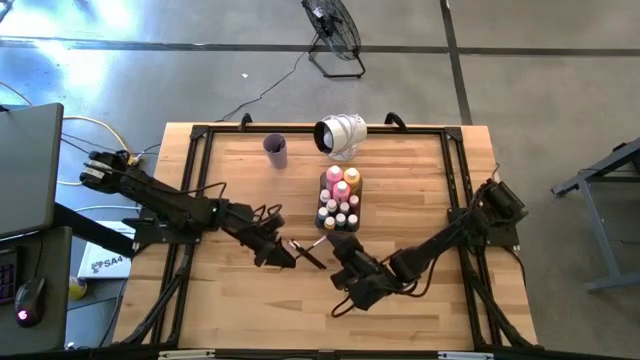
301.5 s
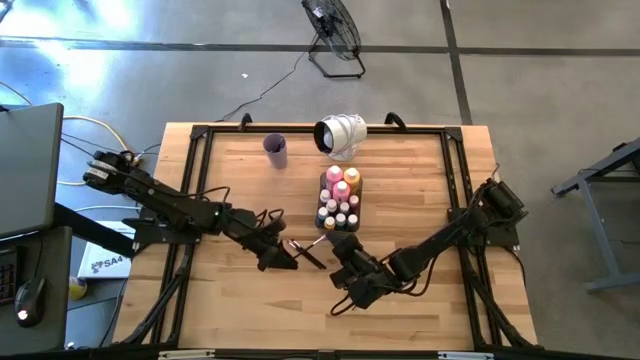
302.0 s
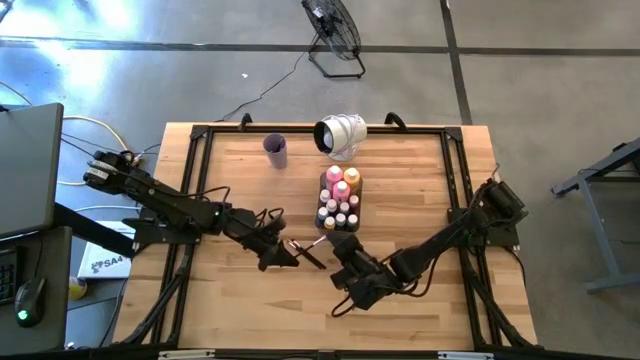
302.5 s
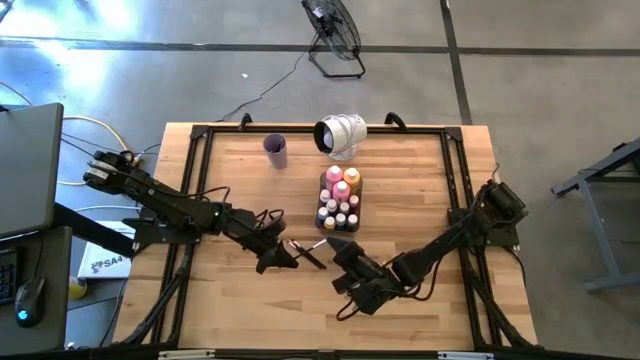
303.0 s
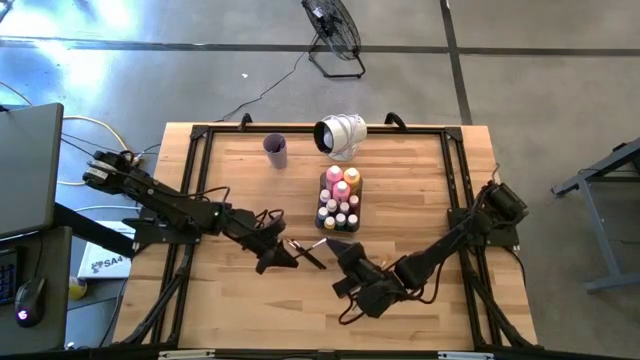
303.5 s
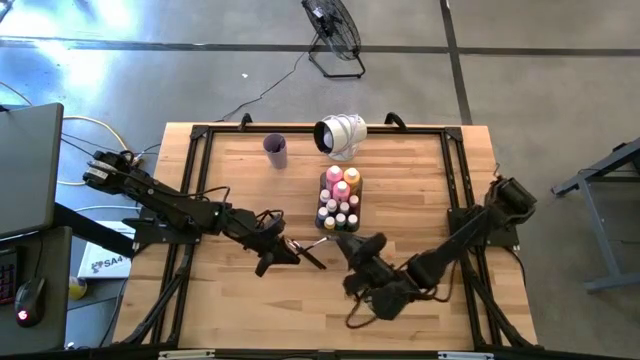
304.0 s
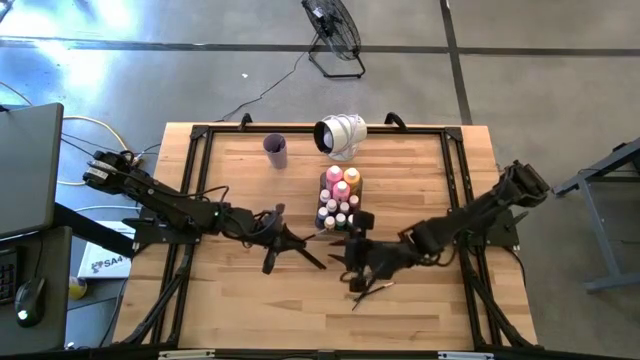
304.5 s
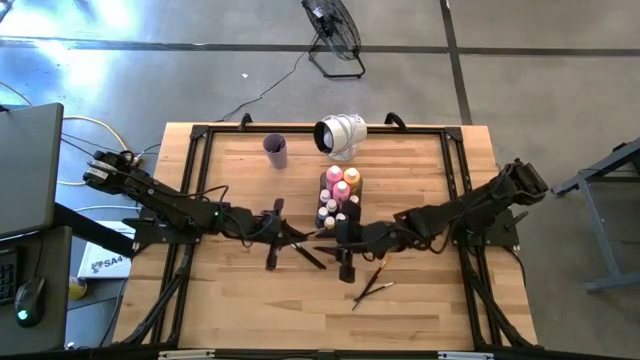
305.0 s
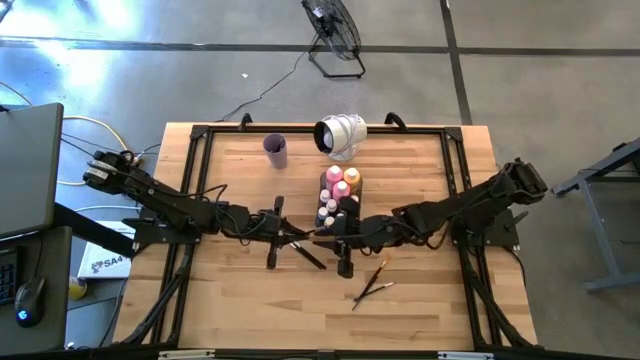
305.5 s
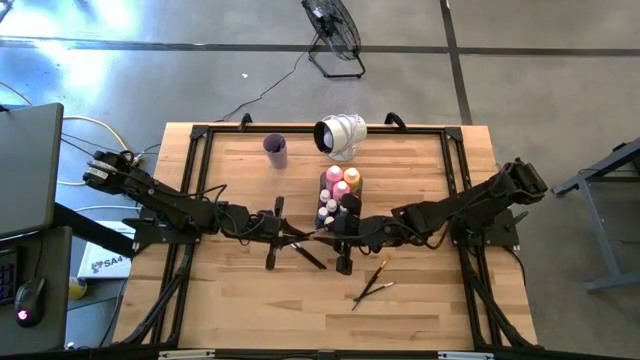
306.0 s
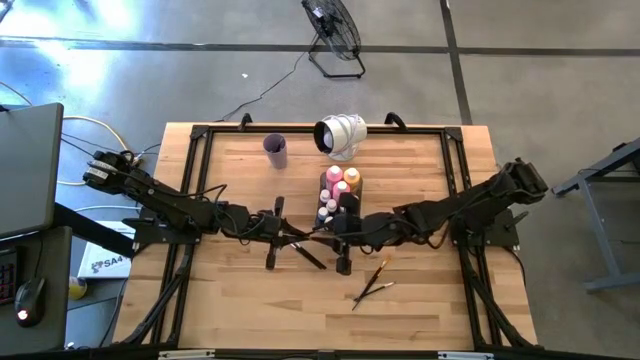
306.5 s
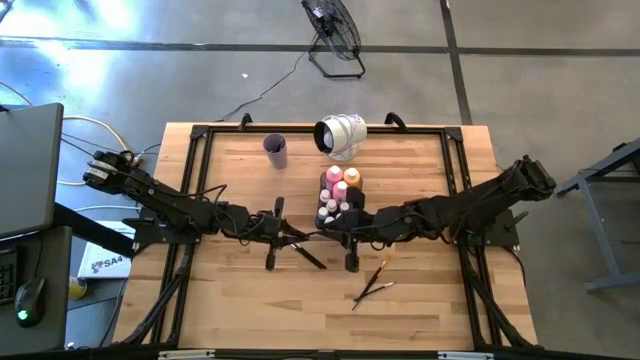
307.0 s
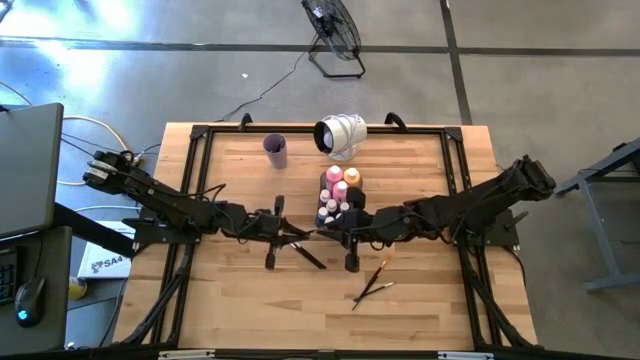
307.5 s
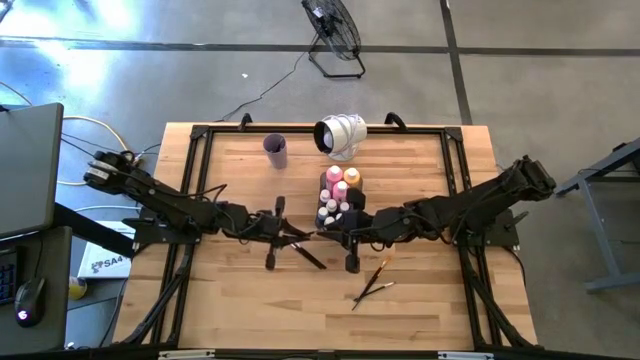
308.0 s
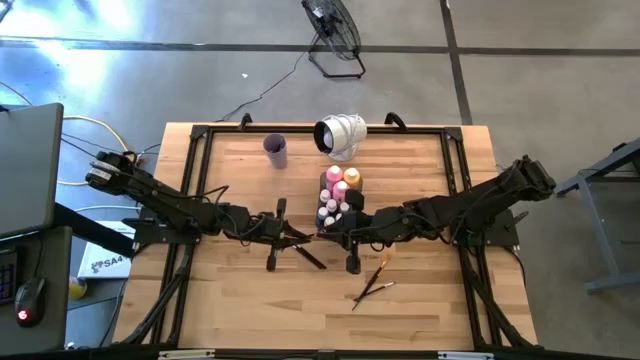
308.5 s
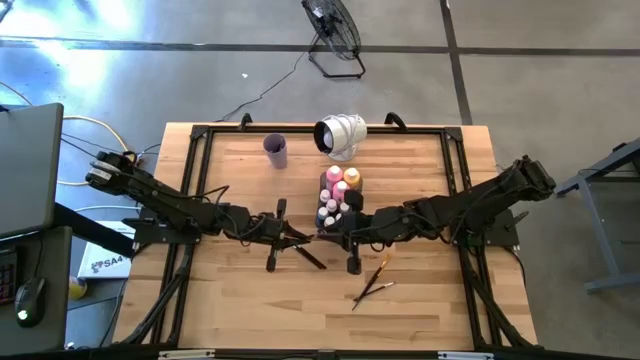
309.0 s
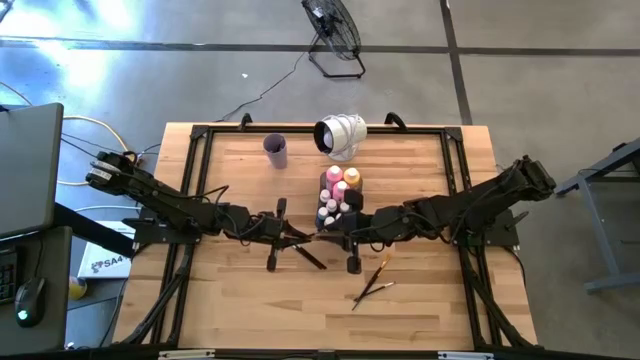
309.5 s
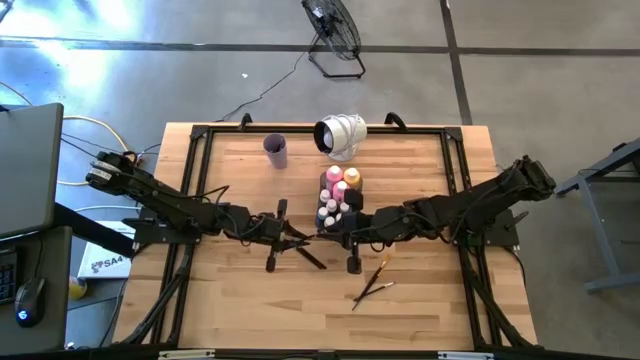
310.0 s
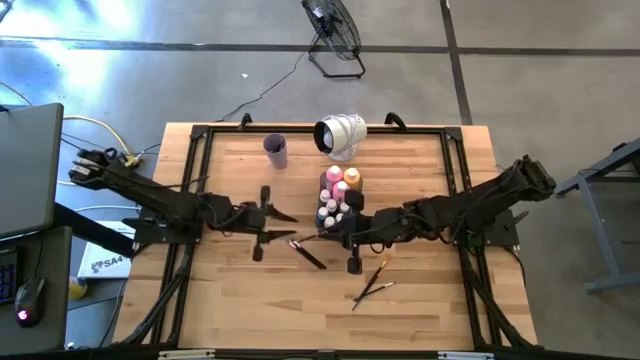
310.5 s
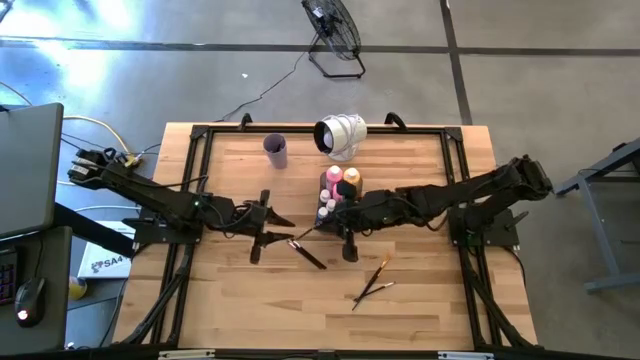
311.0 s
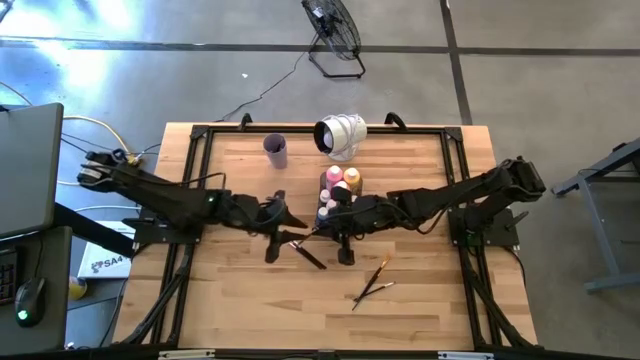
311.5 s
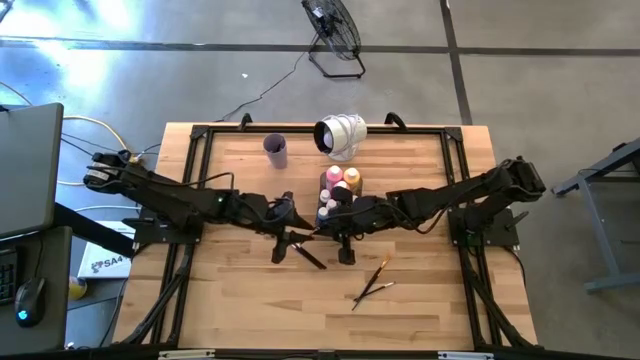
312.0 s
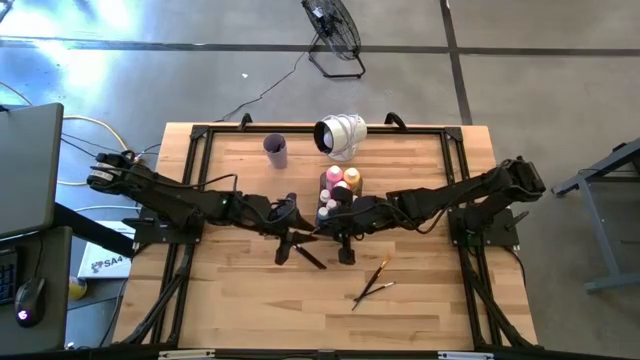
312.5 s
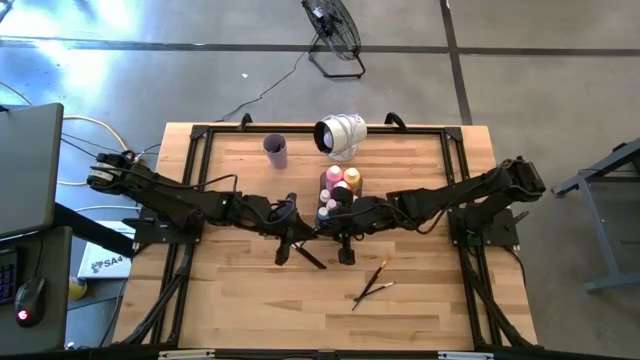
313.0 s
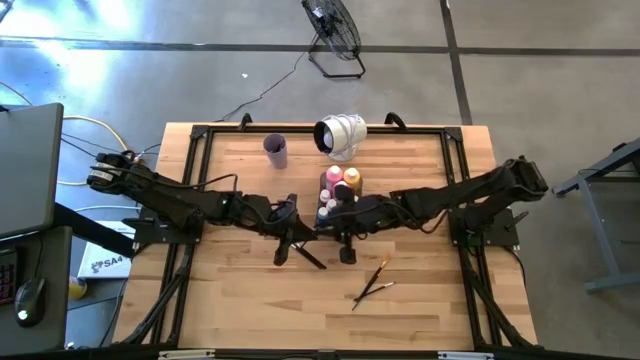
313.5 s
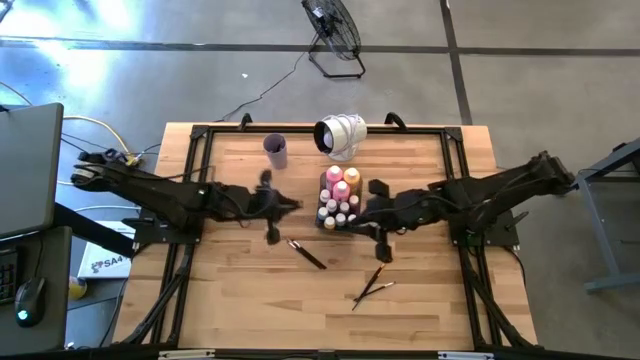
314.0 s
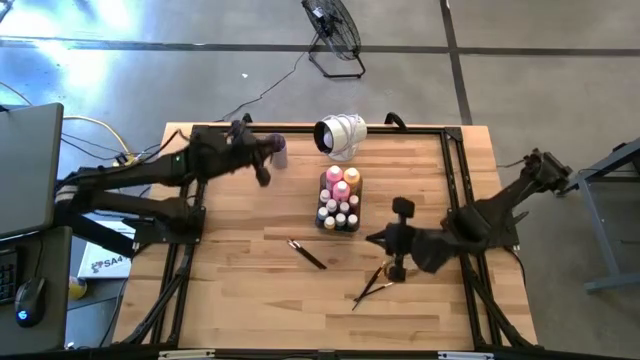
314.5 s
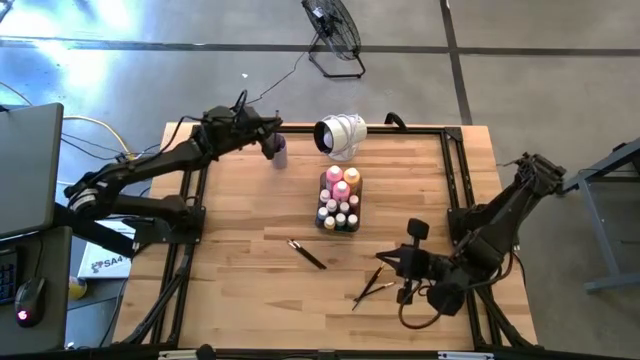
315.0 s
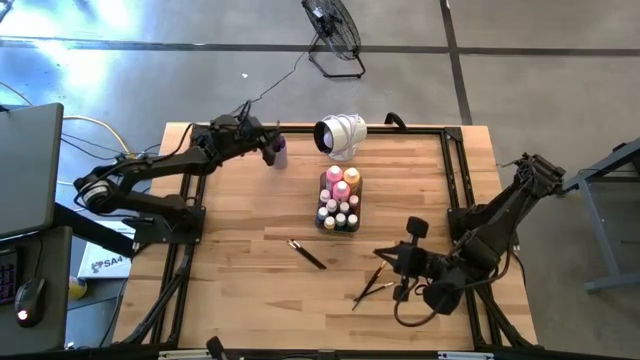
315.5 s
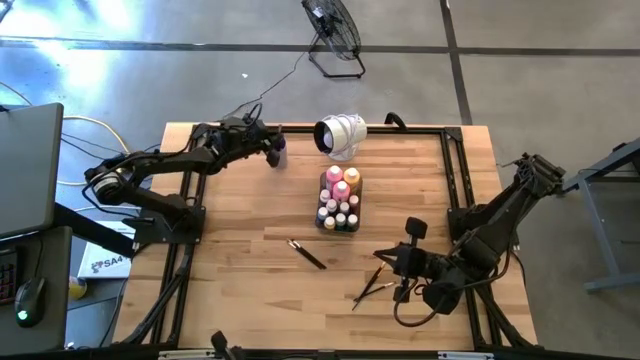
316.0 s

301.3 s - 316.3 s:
Task: Pick & Place Paint Supplies
Put the silver paint brush into the violet cup

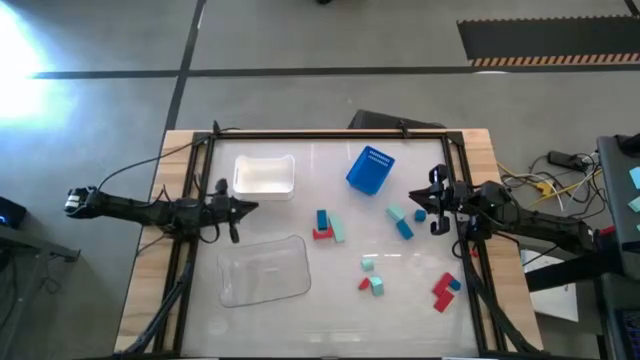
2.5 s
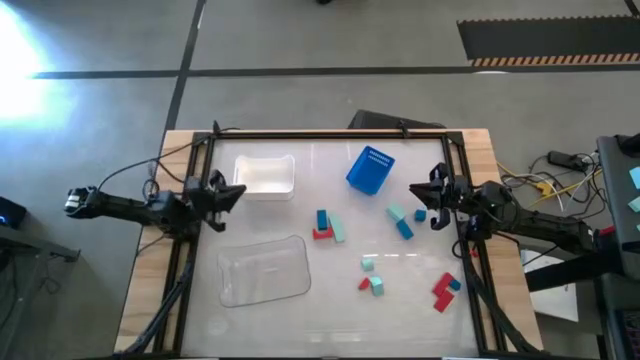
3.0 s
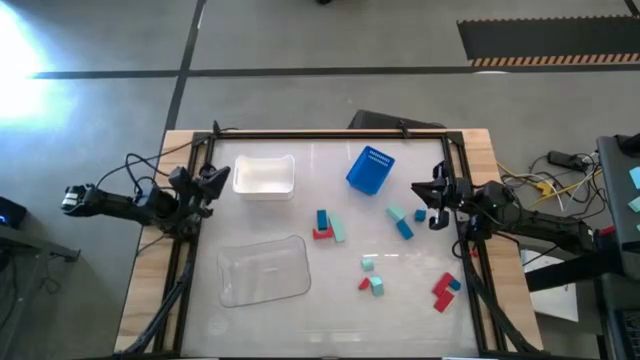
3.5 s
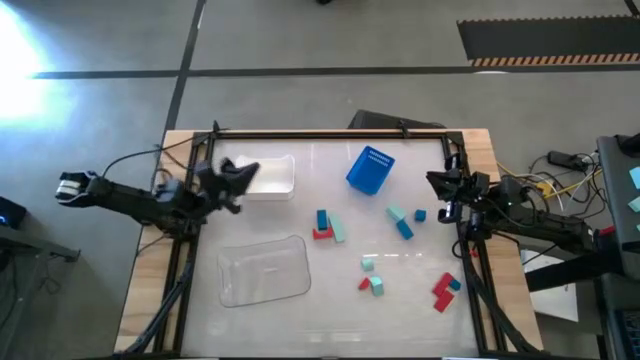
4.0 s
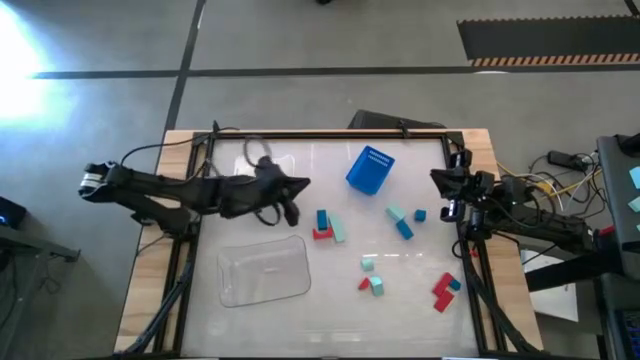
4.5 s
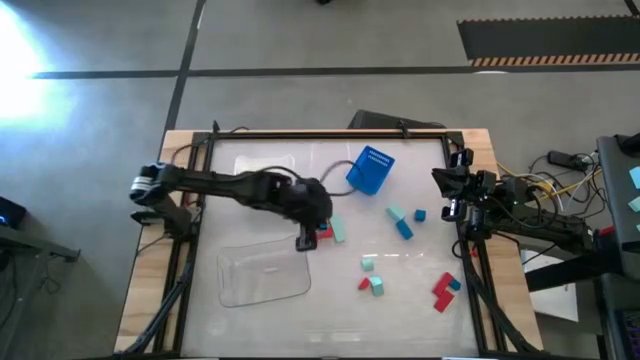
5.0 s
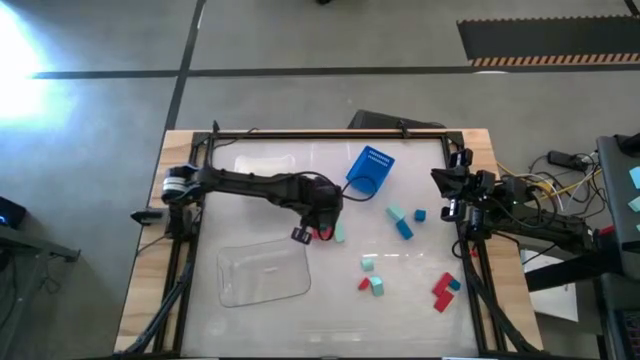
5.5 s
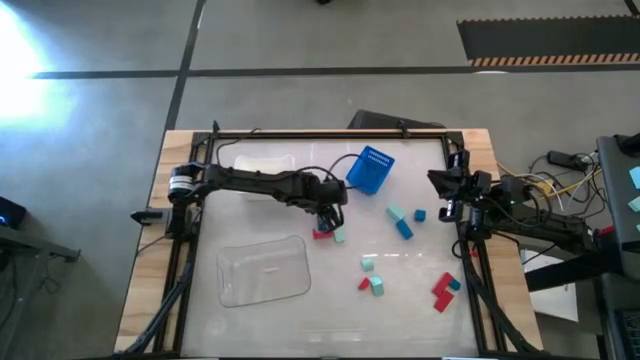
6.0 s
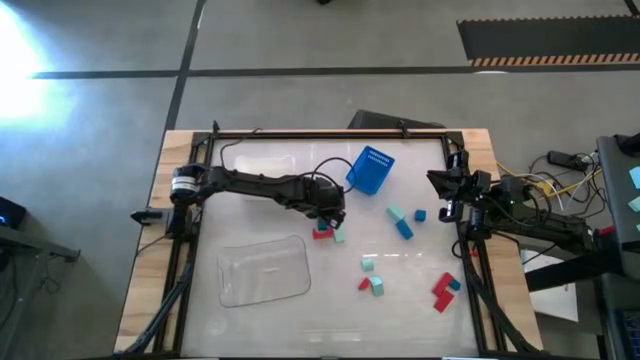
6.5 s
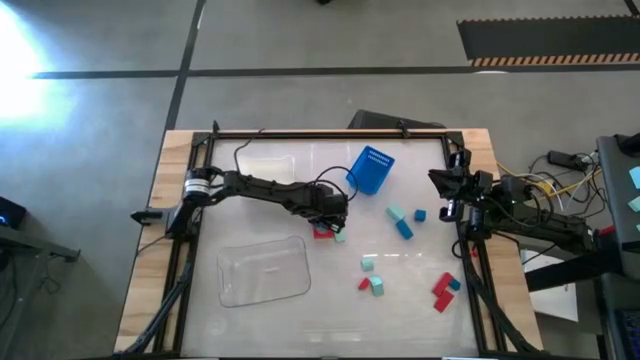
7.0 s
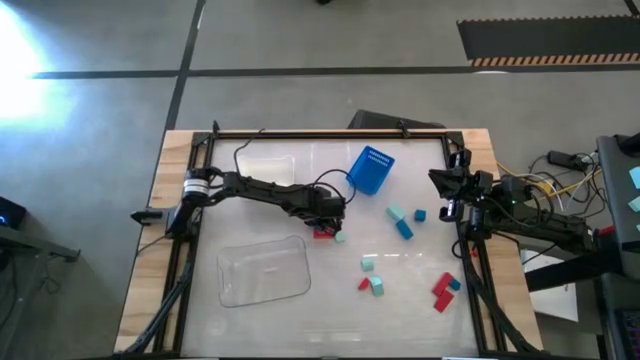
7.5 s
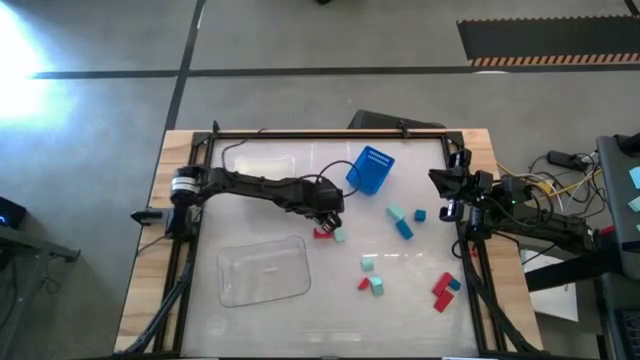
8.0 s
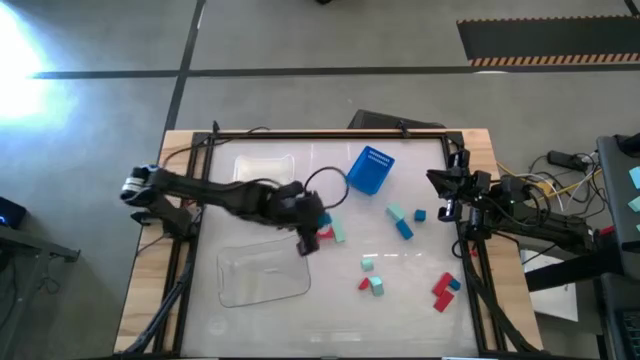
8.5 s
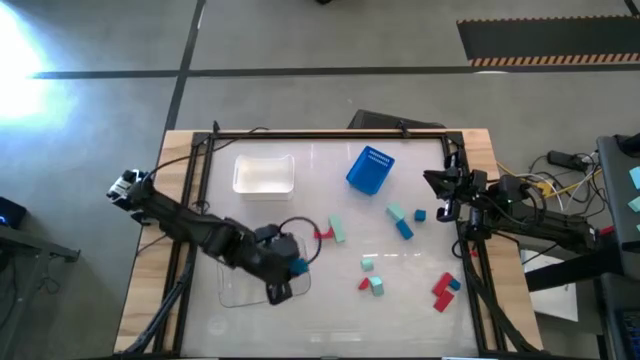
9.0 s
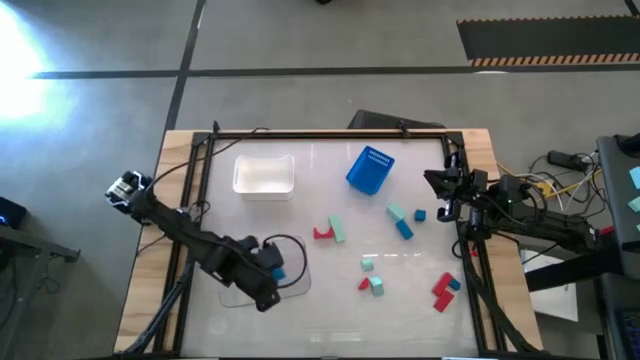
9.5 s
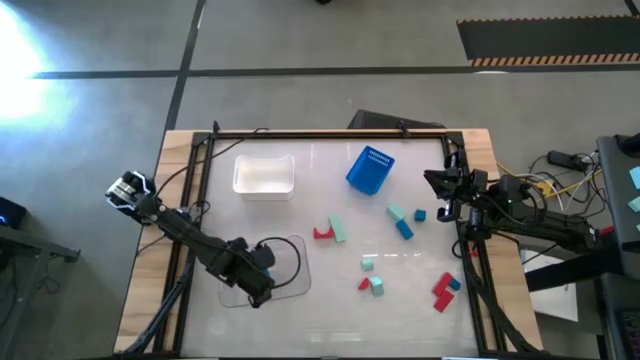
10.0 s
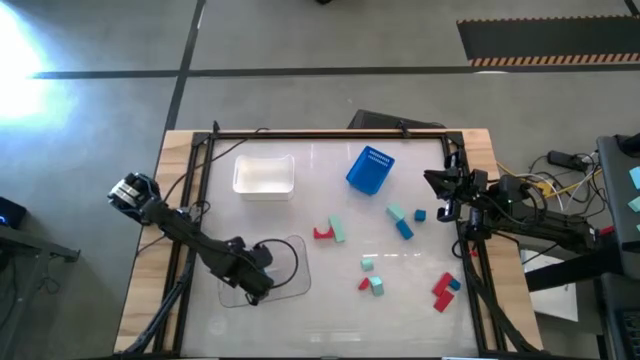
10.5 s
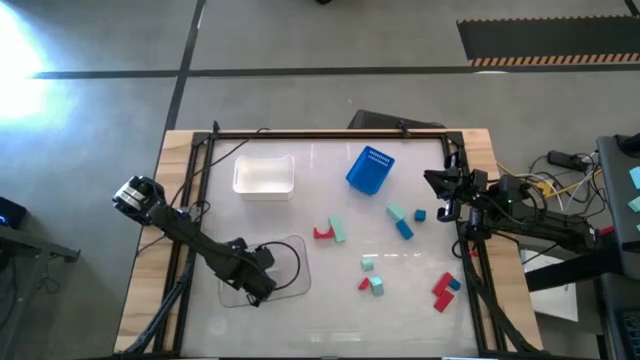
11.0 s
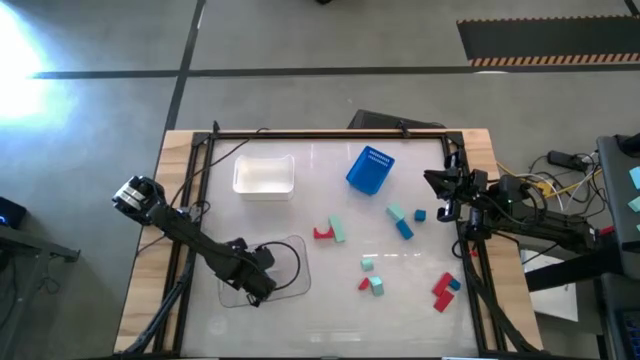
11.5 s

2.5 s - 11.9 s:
Task: Sort & place blocks by color
Put the blue block into the transparent bin
